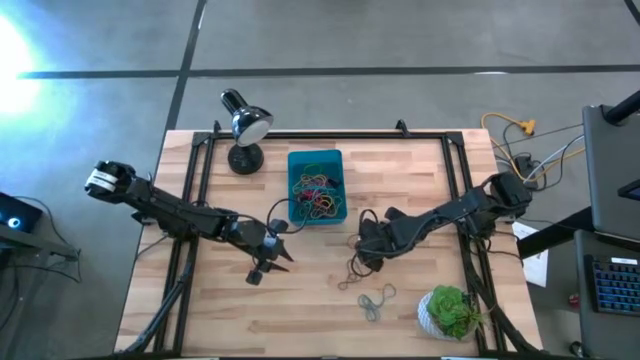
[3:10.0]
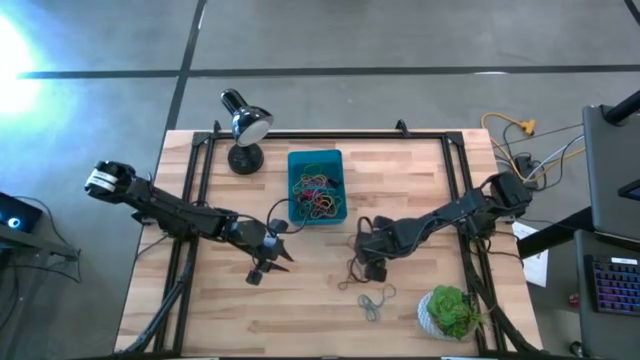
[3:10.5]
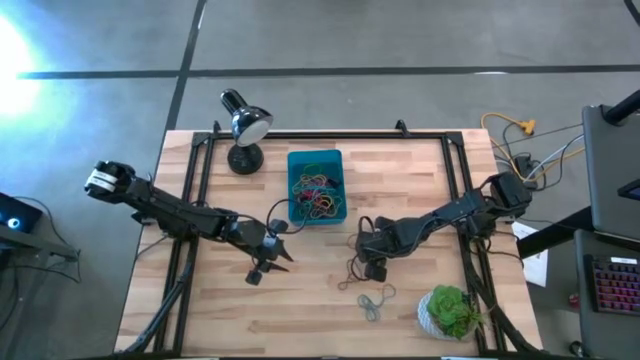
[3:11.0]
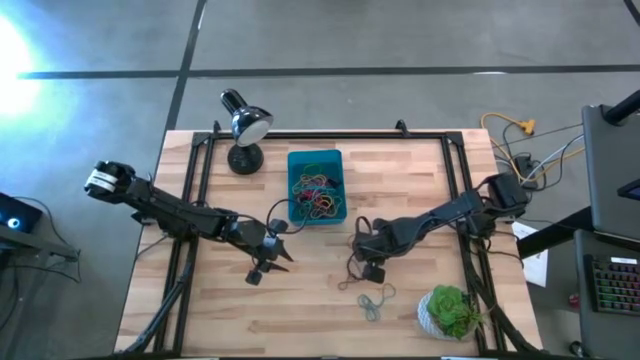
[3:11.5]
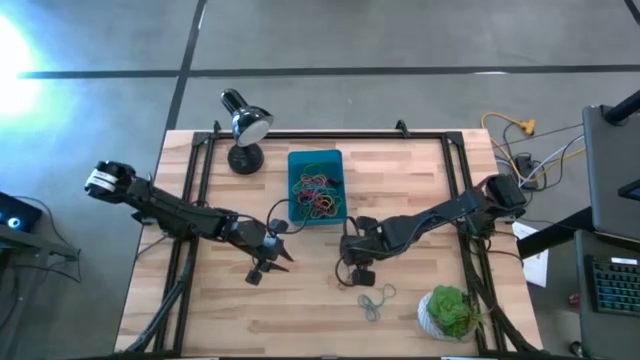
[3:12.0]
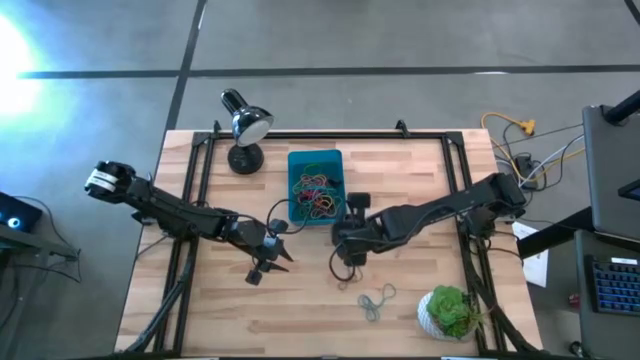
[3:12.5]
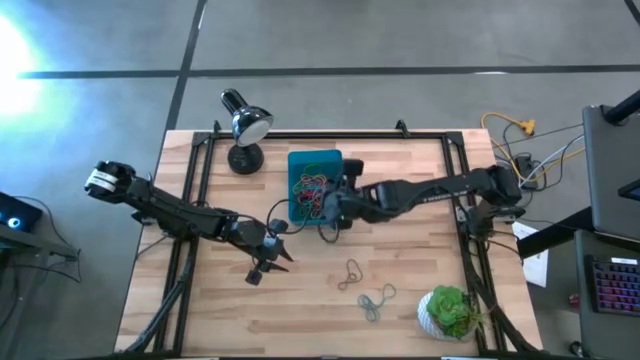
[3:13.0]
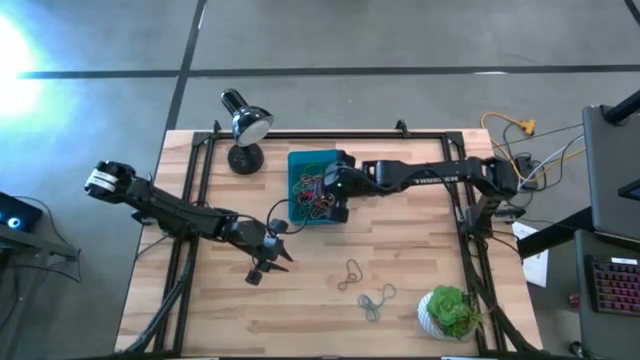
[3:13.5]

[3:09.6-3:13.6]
Task: Pick and place rubber bands into bin
Put the red rubber band into the blue bin

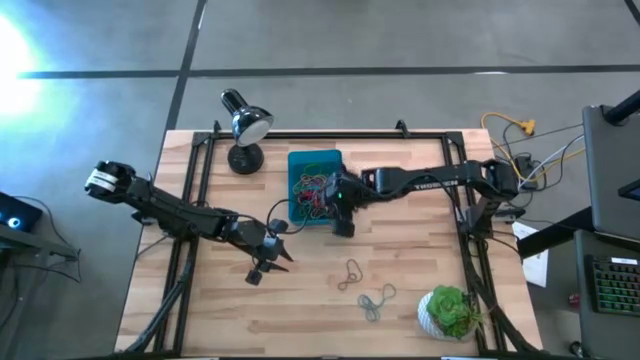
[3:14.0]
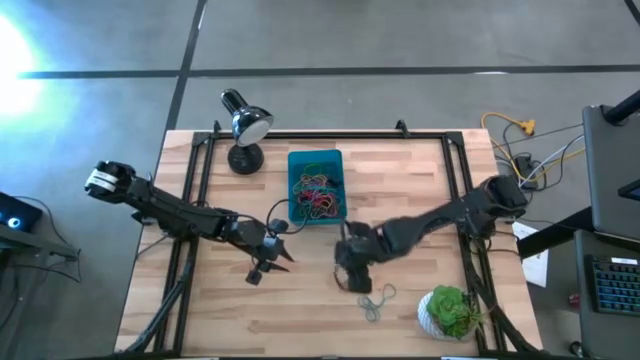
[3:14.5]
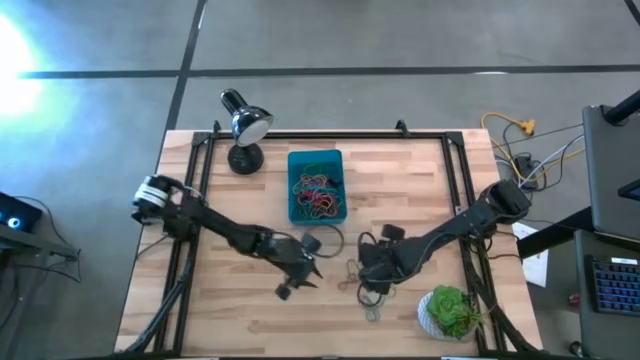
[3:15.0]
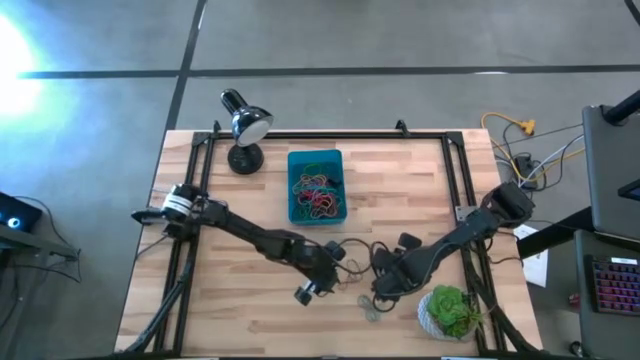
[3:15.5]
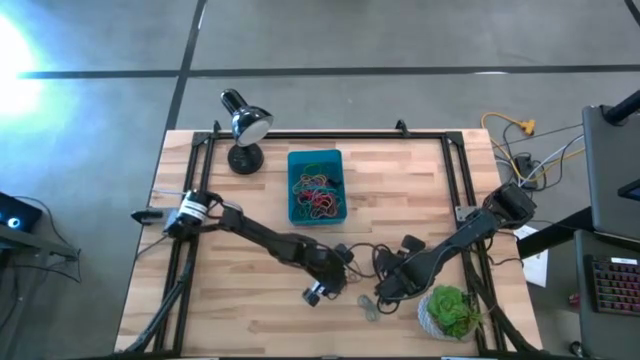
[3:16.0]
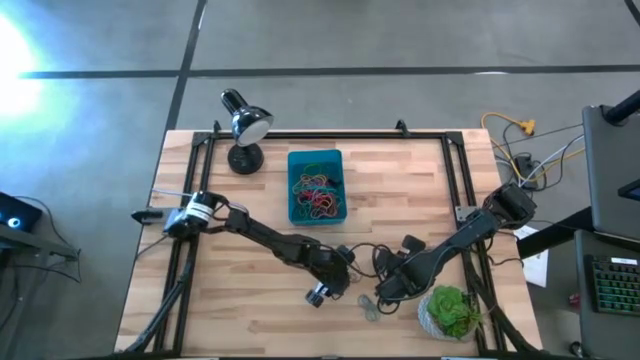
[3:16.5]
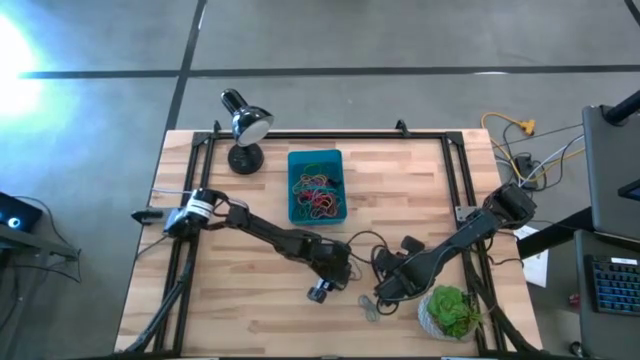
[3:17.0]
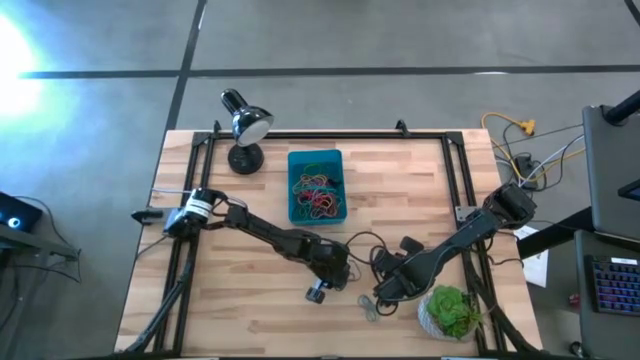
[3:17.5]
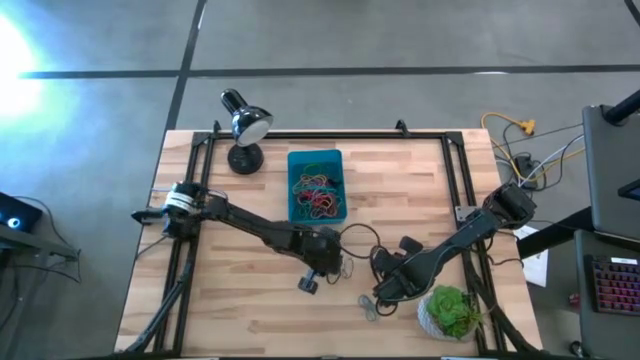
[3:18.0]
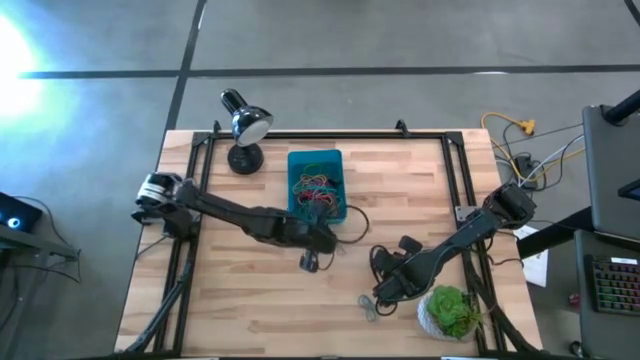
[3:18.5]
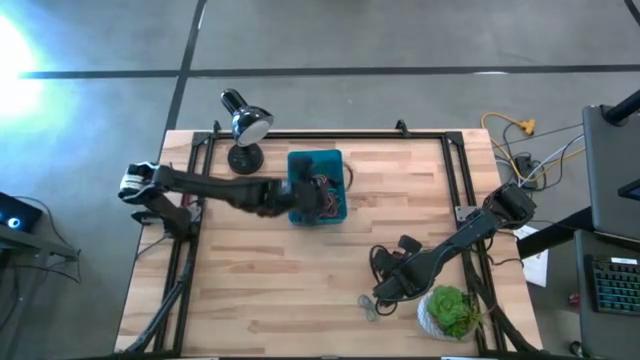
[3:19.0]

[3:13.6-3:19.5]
Put the violet rubber band into the blue bin

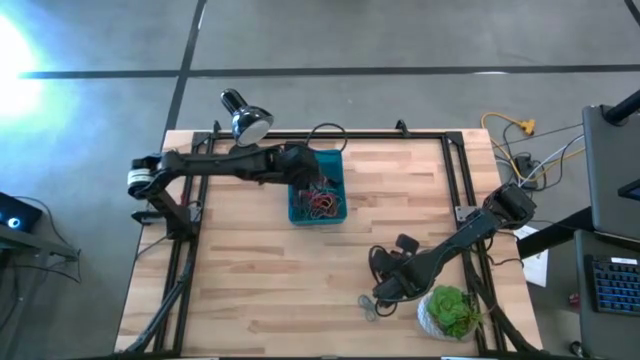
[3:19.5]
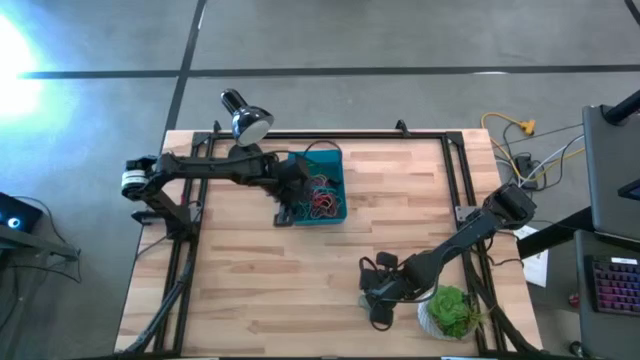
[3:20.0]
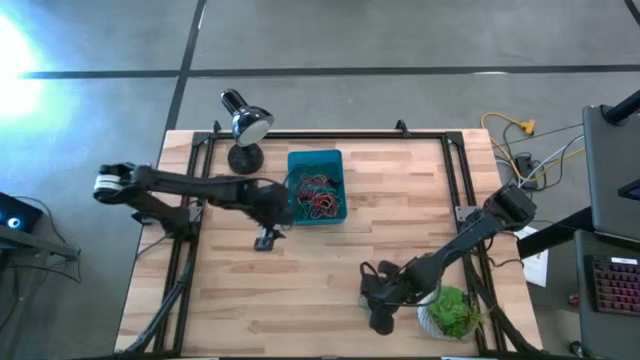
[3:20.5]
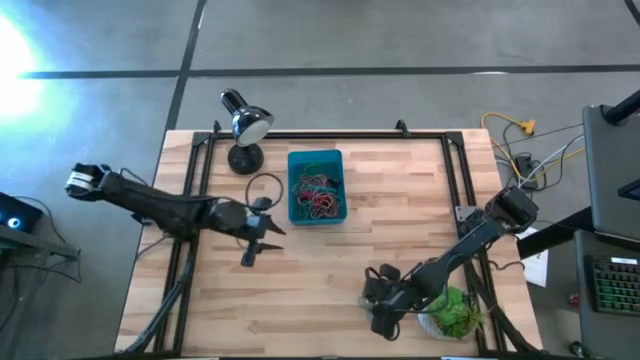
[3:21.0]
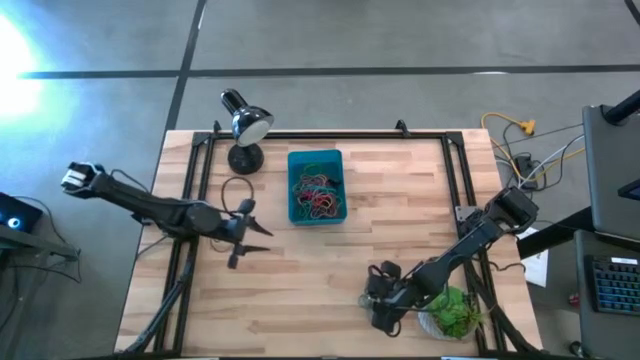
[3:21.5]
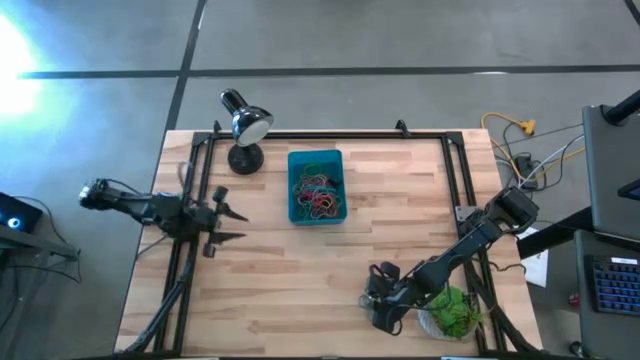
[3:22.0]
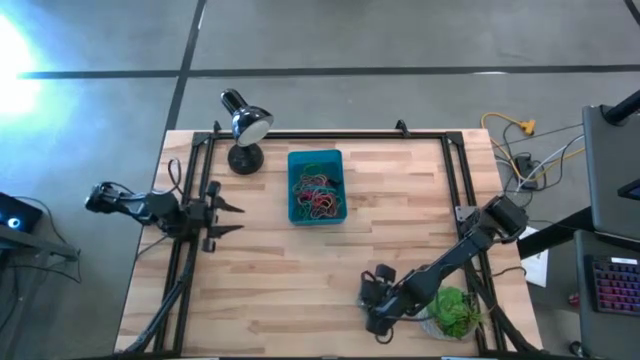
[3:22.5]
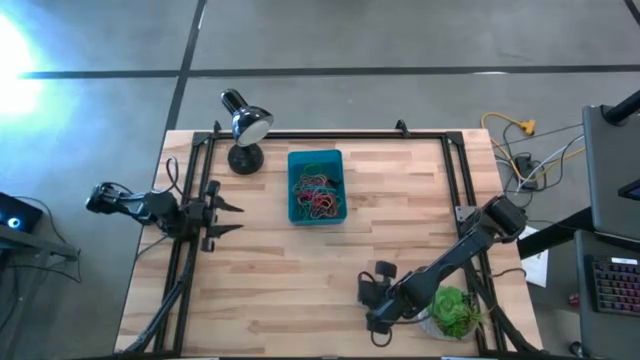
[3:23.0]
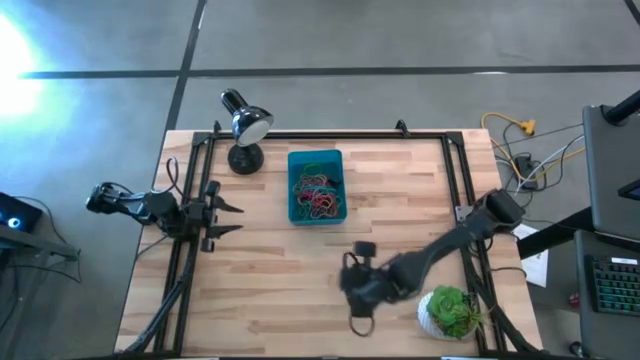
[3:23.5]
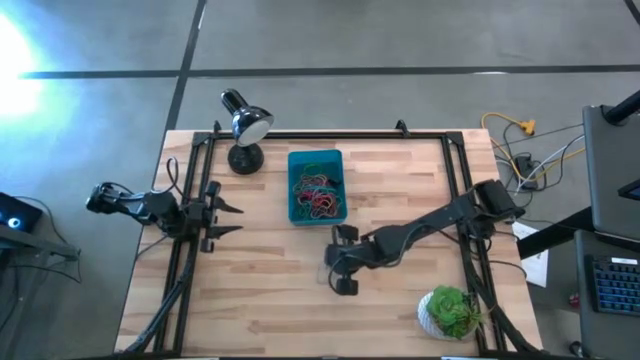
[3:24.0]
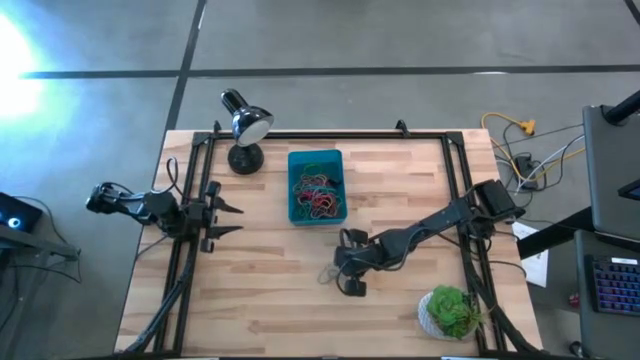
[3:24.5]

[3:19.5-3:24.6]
Put the blue rubber band into the blue bin

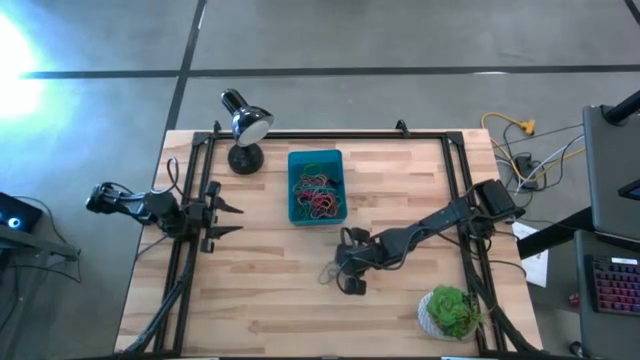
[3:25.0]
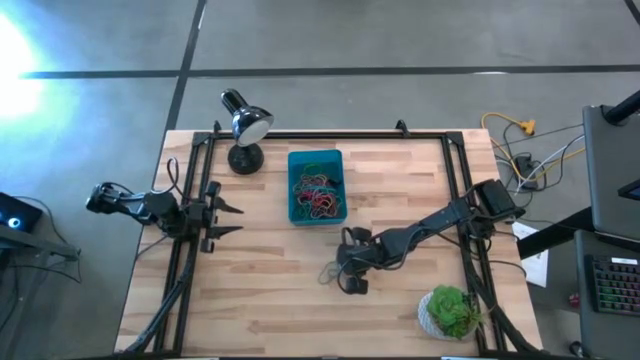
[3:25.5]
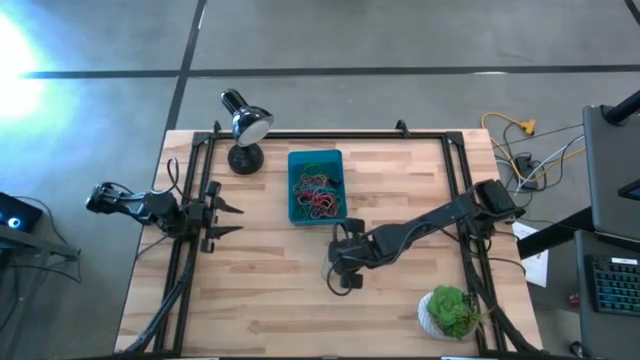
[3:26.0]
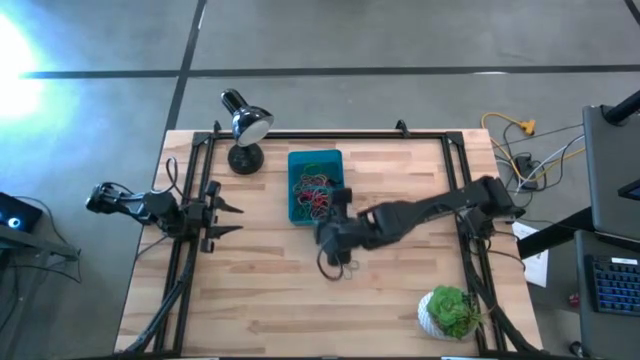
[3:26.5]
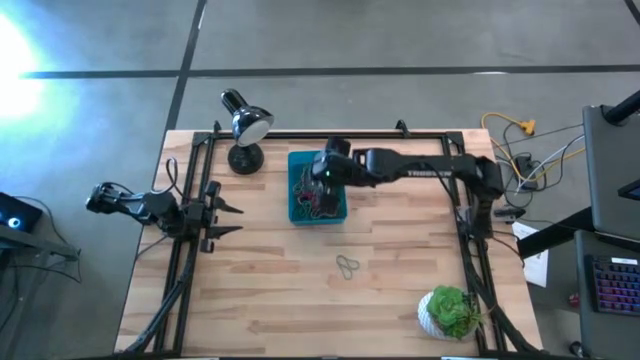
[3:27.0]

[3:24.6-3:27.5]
Put the blue rubber band into the blue bin

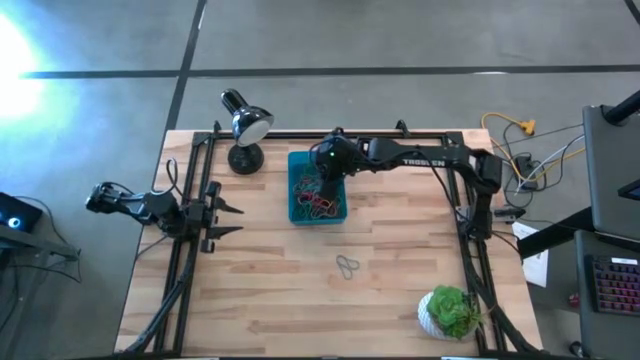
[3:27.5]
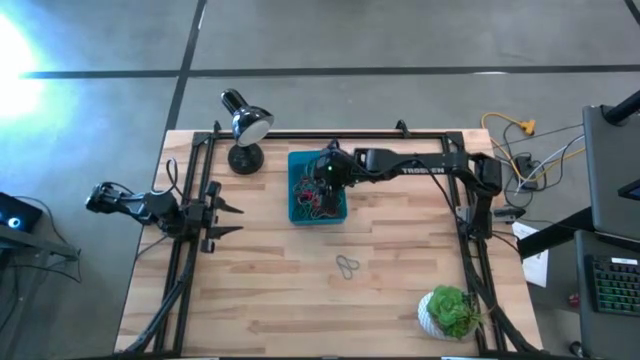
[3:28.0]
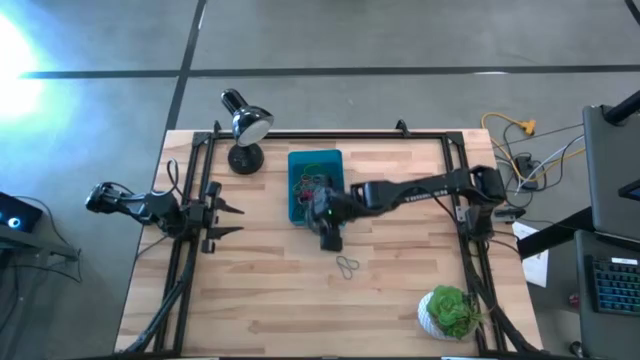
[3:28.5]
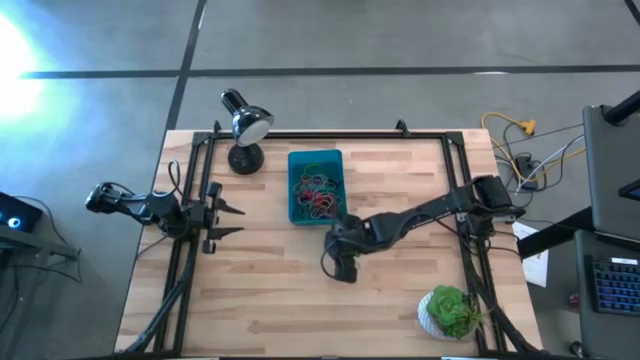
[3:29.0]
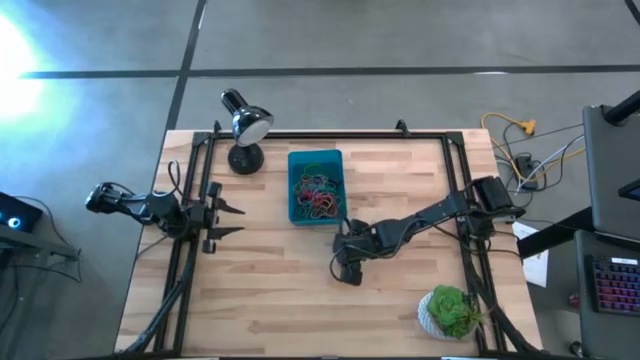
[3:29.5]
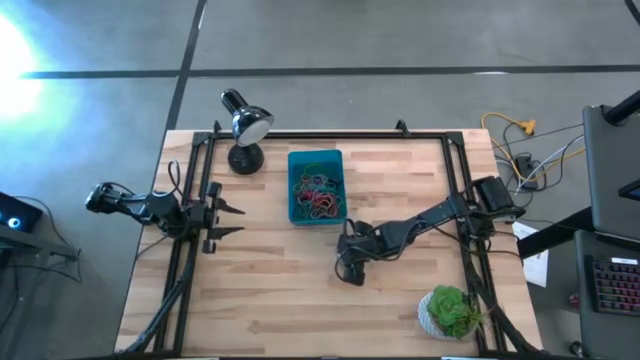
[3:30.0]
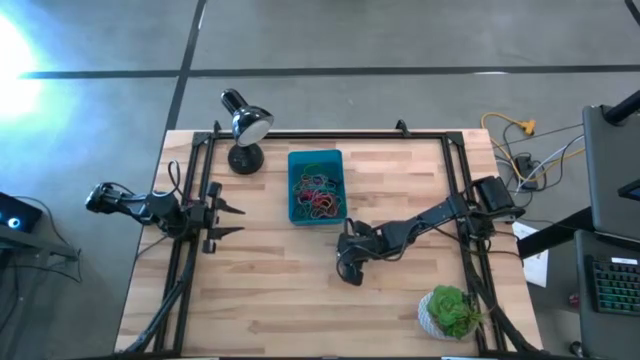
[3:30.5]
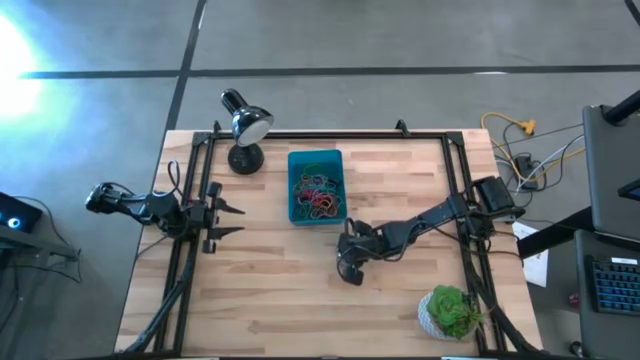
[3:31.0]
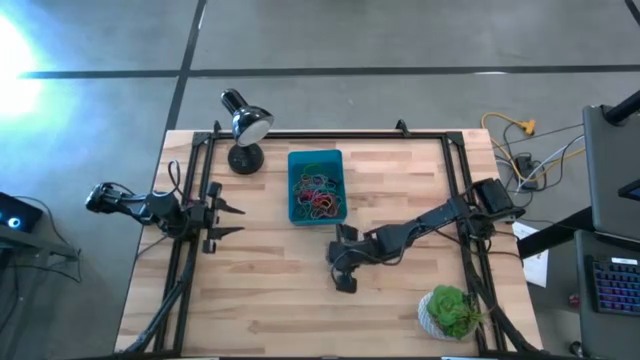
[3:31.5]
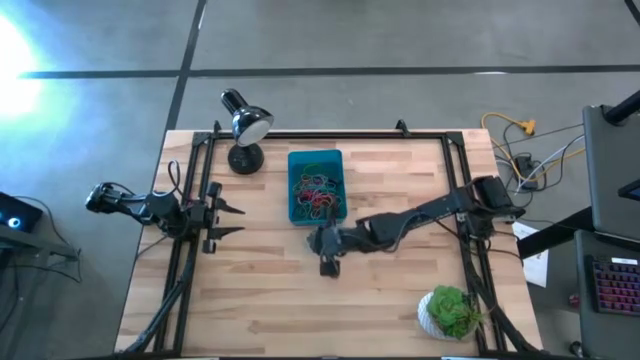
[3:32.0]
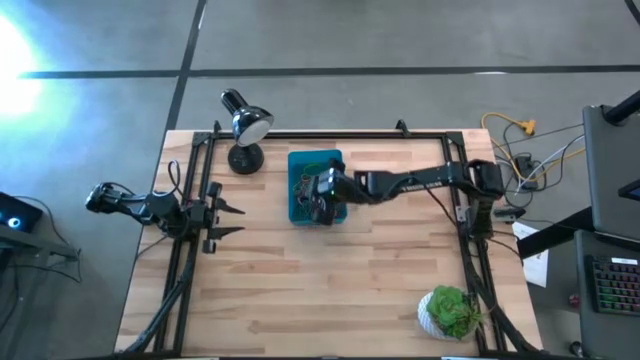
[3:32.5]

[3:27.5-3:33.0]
Put the blue rubber band into the blue bin
